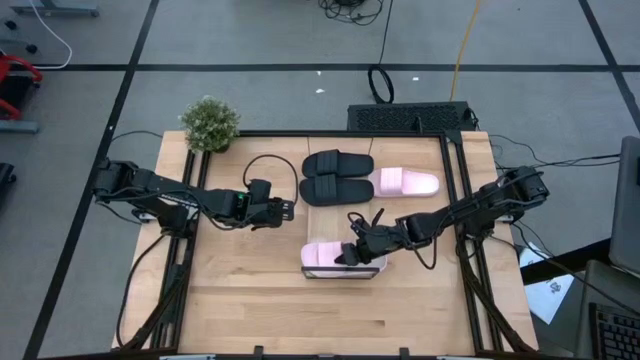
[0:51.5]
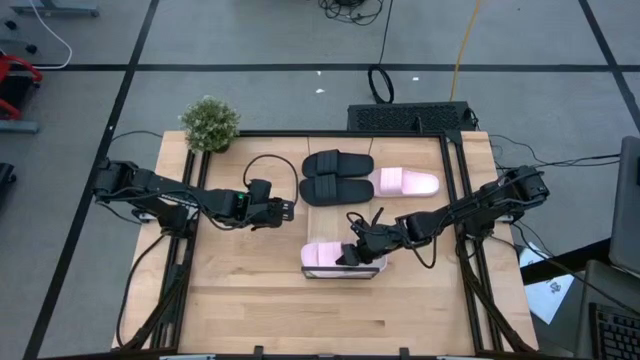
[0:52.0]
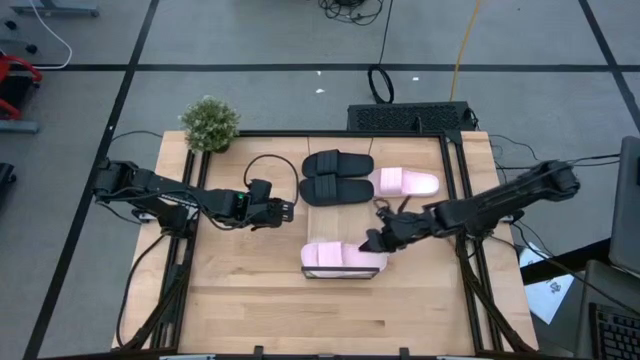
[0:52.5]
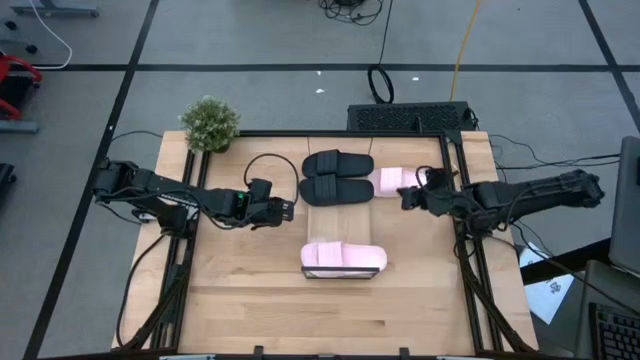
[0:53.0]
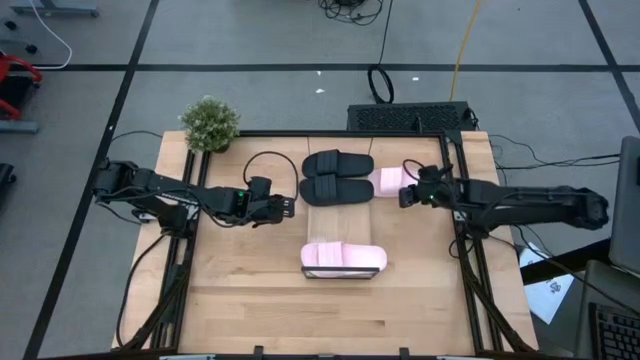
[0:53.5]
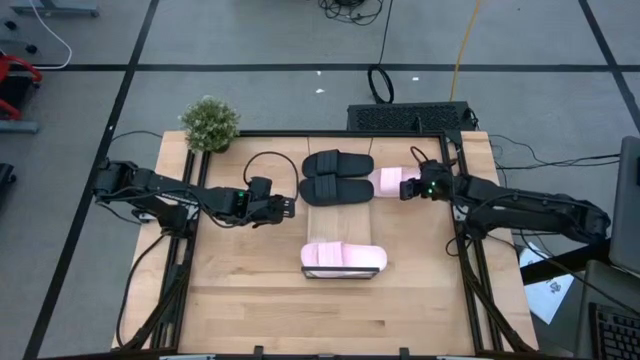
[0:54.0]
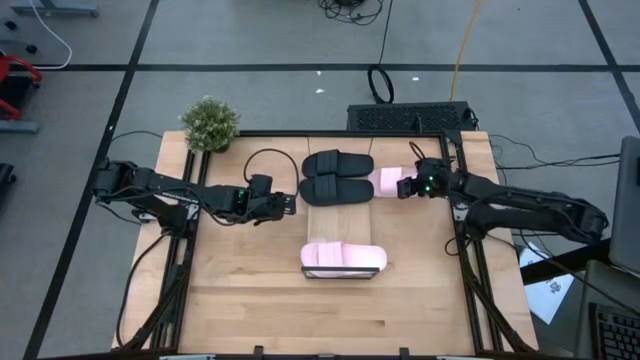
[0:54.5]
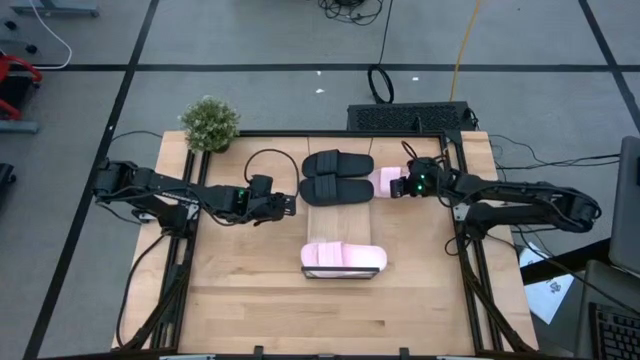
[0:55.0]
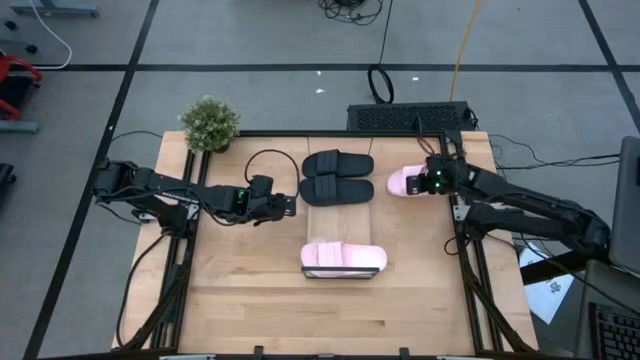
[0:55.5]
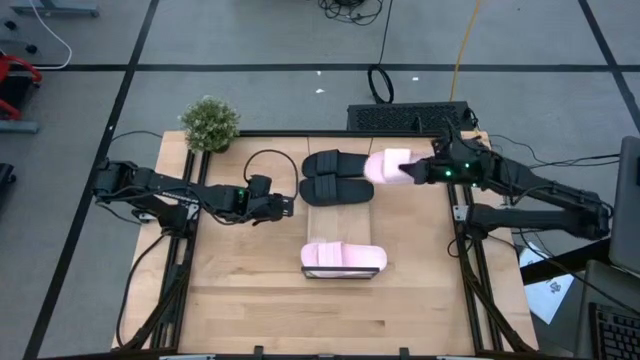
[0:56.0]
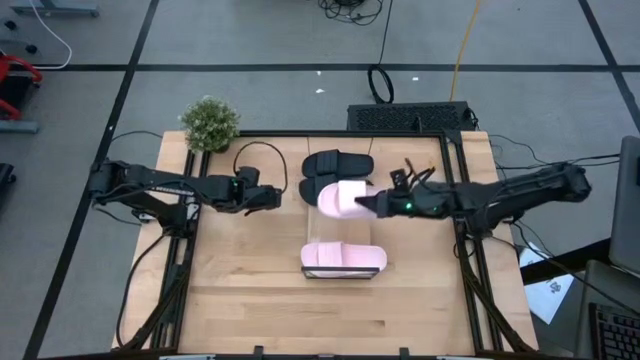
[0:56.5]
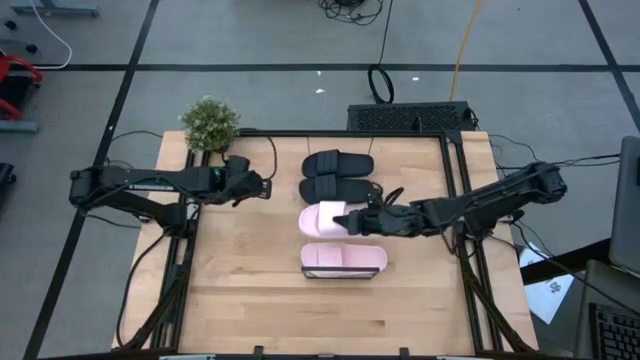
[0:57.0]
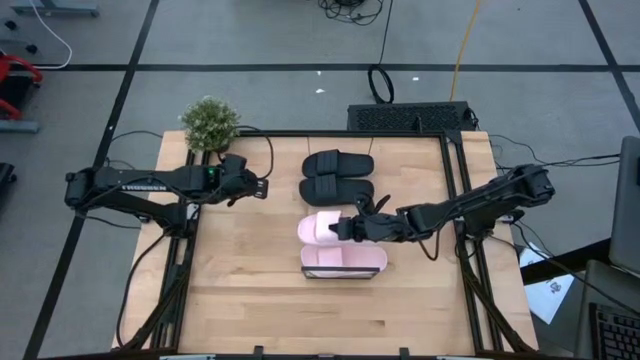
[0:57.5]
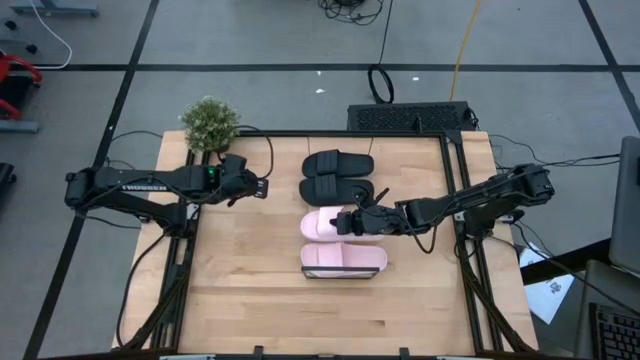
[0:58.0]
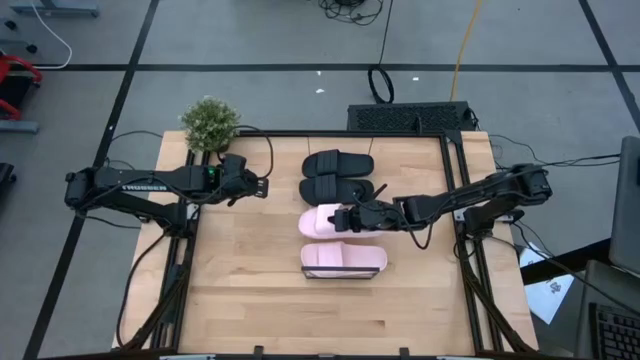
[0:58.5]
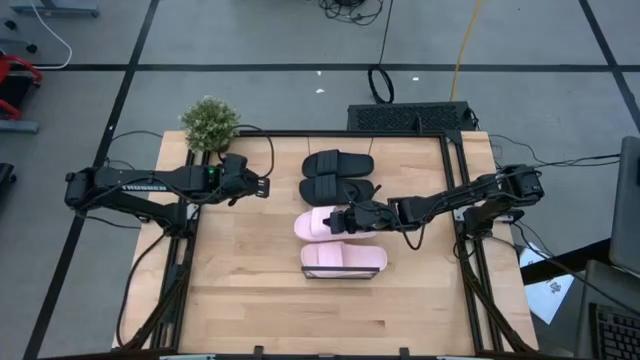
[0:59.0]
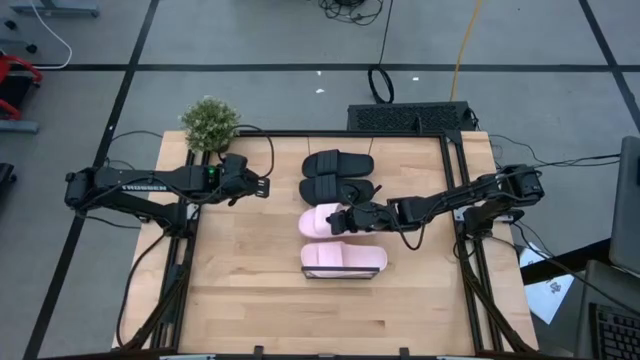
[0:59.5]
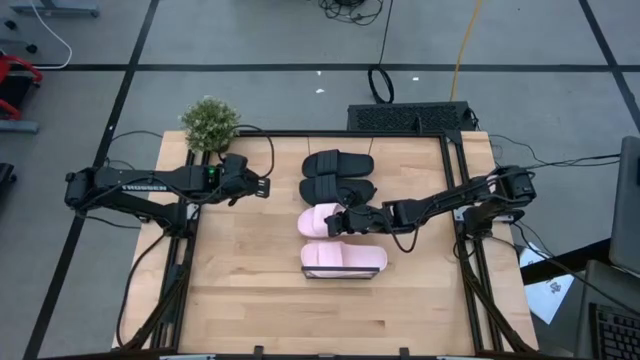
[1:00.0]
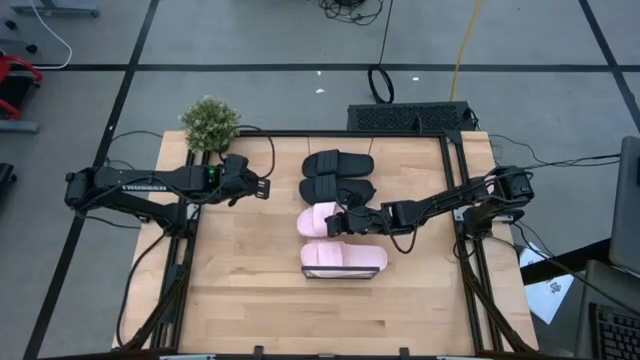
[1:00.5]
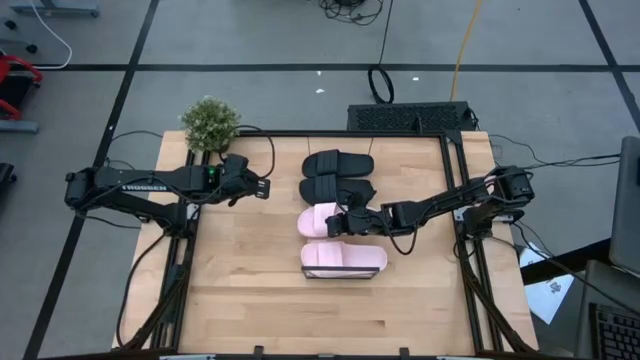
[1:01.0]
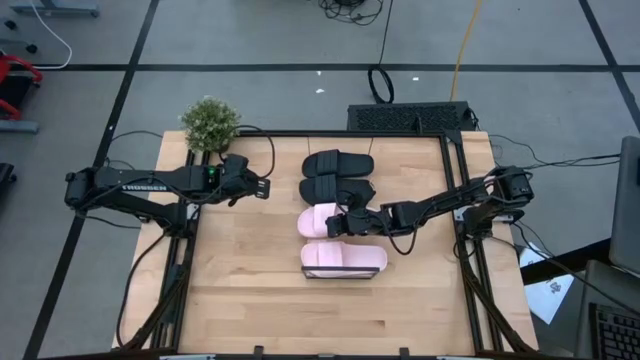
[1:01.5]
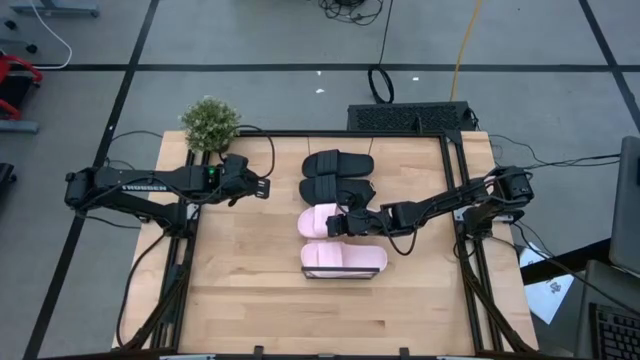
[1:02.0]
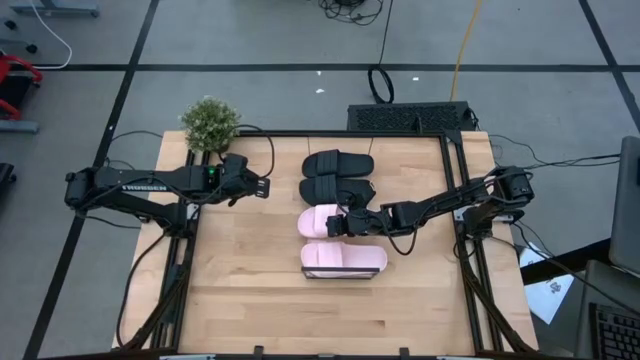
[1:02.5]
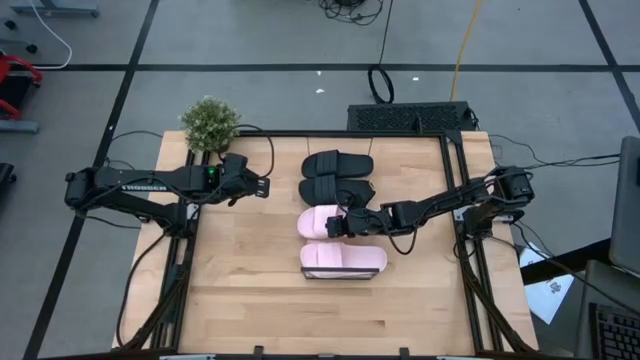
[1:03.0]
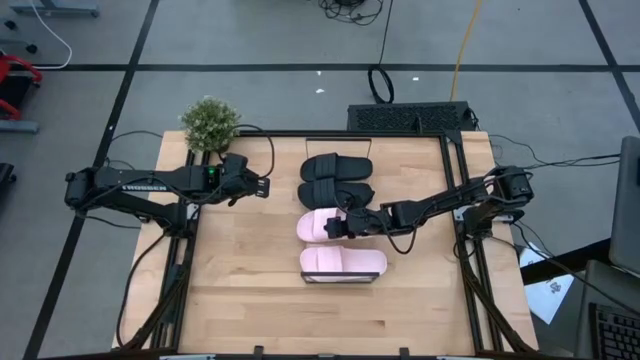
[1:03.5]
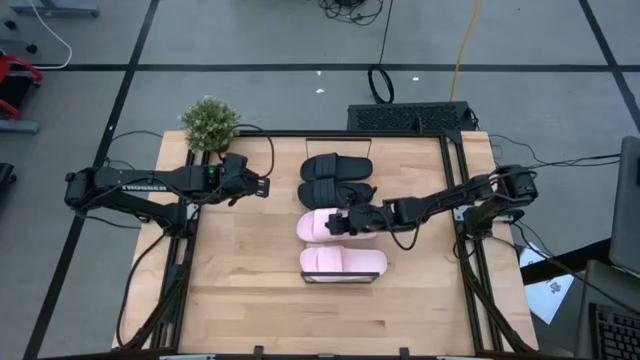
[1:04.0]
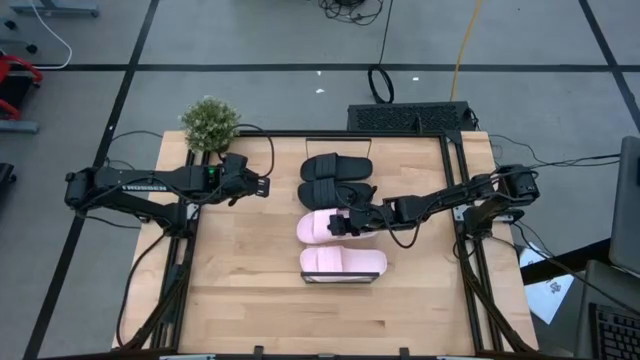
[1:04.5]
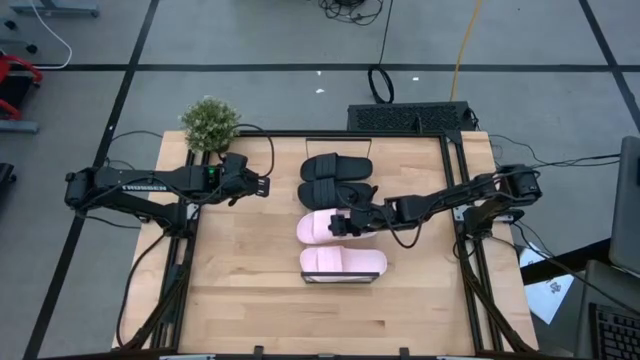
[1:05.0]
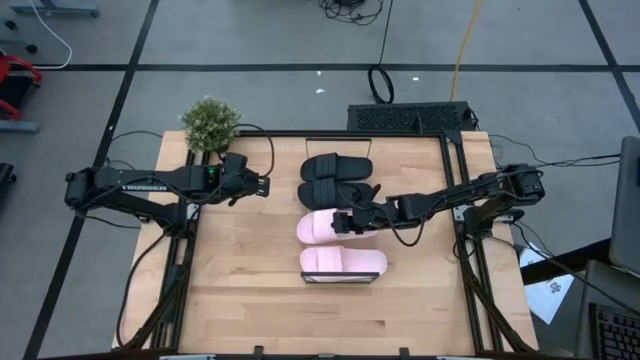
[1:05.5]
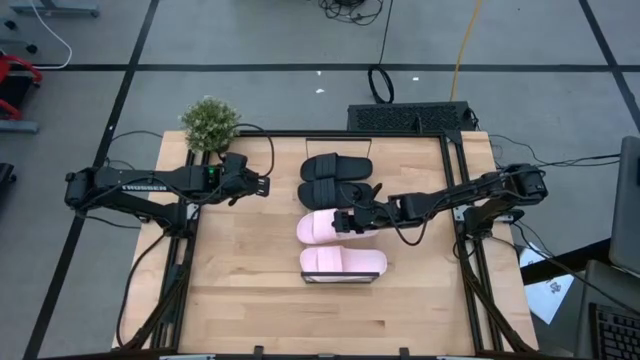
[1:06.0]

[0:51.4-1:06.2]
Task: Pick and place slides into the shelf
Put the pink slide on the shelf

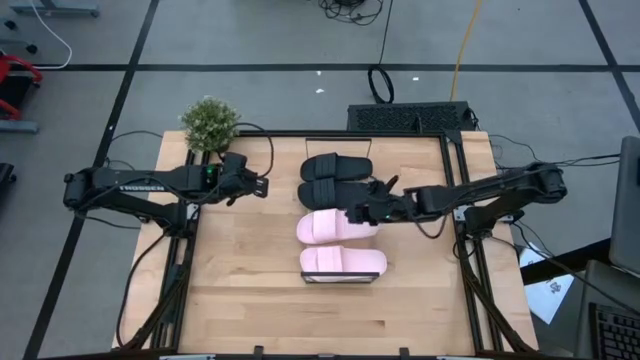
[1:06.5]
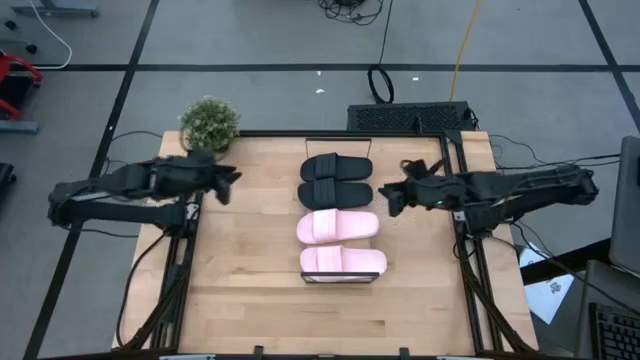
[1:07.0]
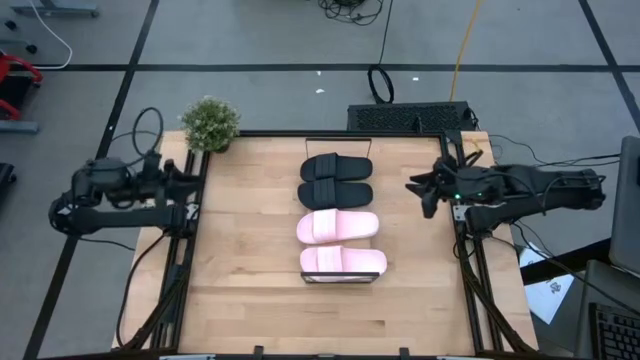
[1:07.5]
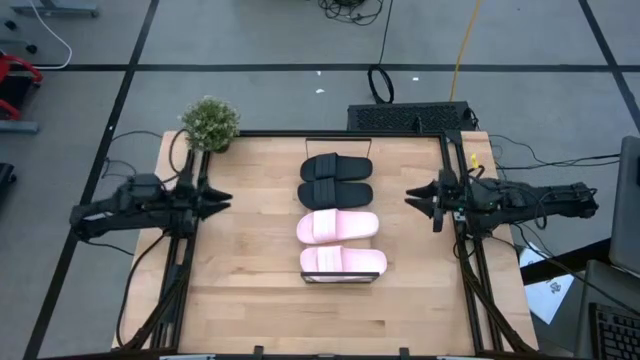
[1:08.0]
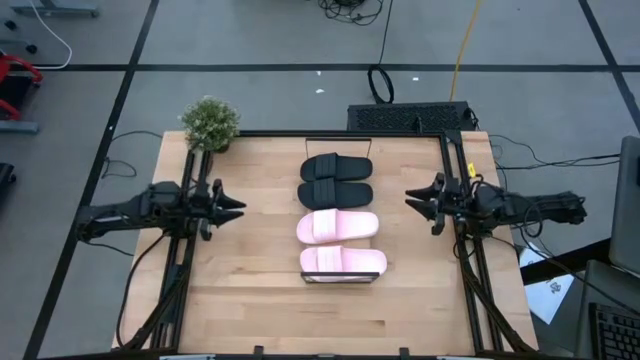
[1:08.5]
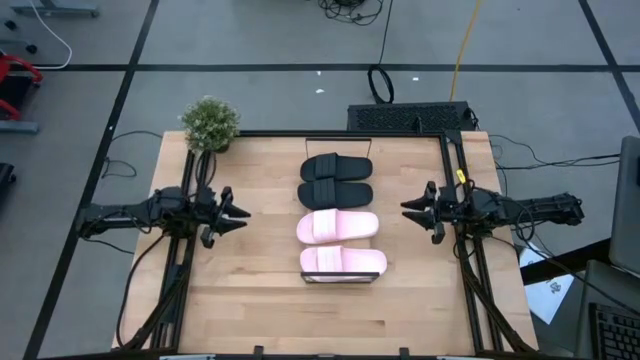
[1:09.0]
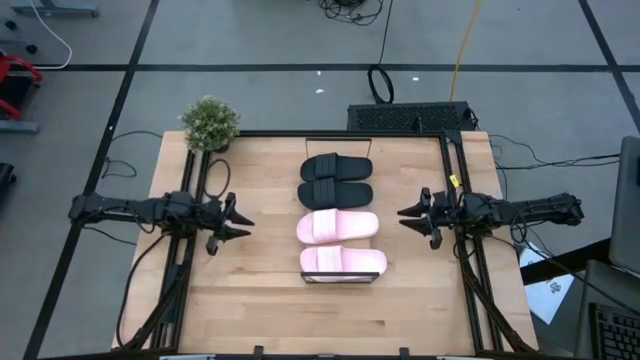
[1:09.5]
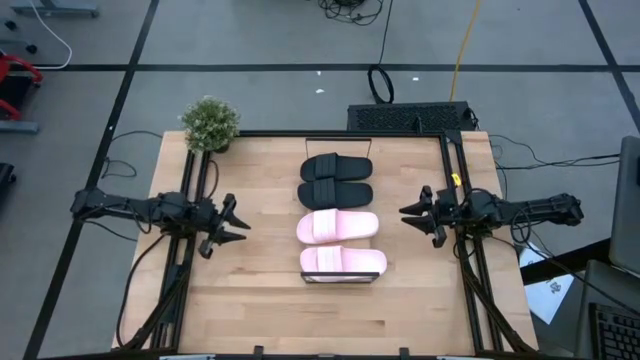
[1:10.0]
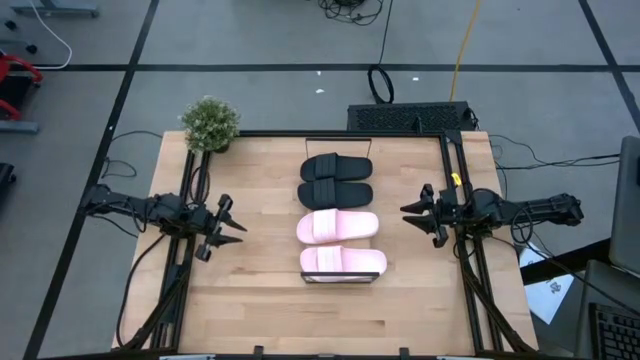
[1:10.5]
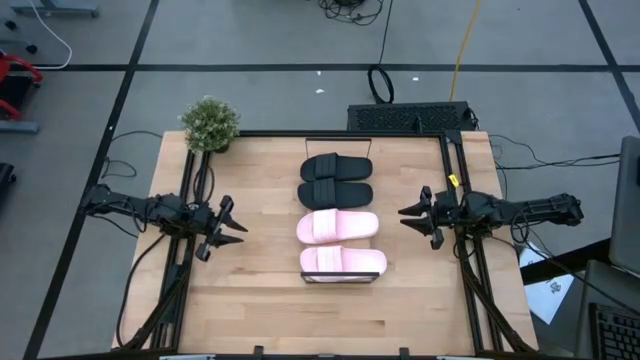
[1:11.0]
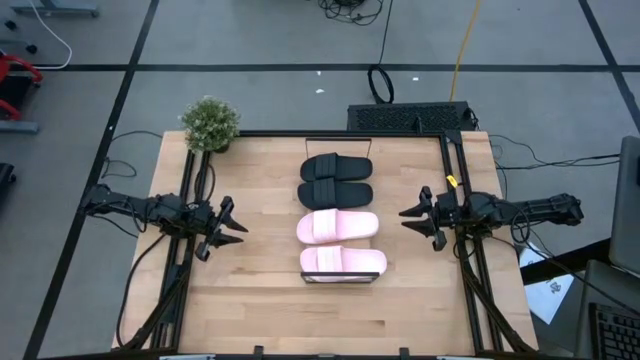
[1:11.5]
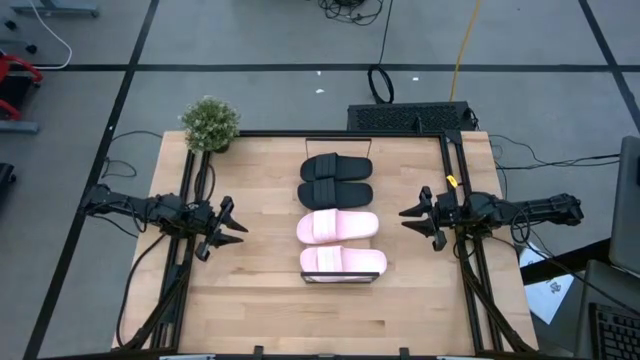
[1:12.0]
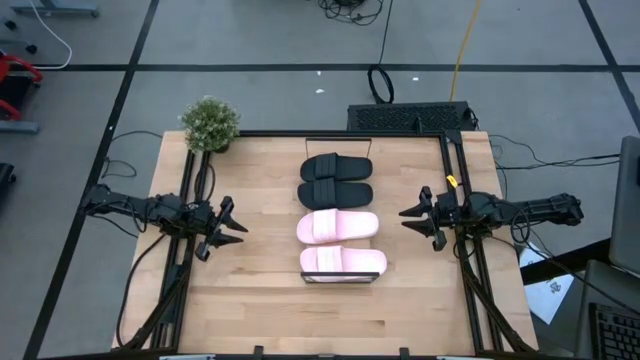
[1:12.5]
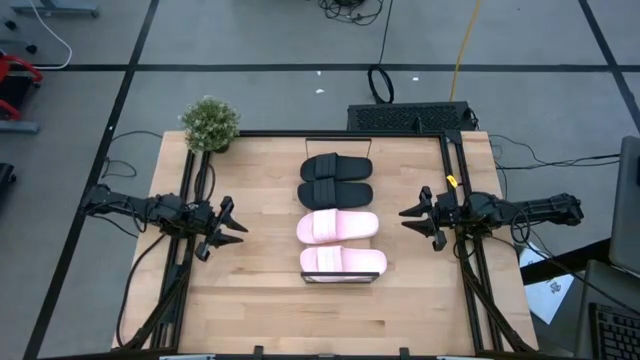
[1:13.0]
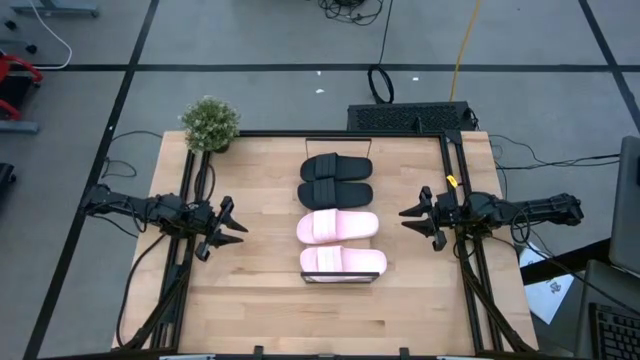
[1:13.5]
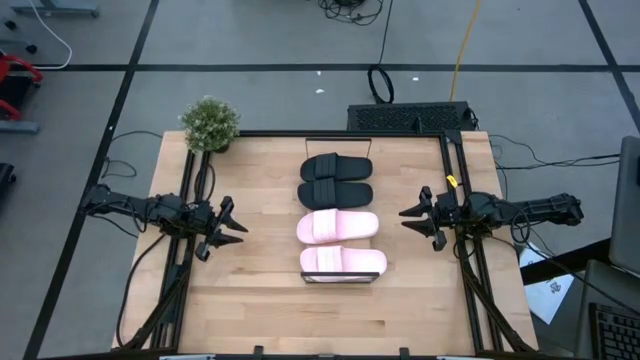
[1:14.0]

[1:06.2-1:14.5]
Return to Home Position
